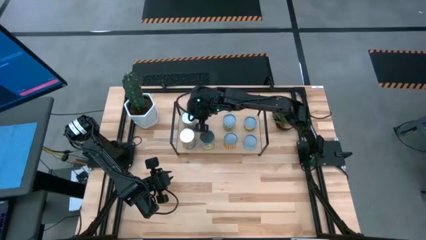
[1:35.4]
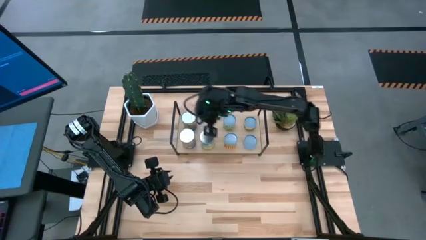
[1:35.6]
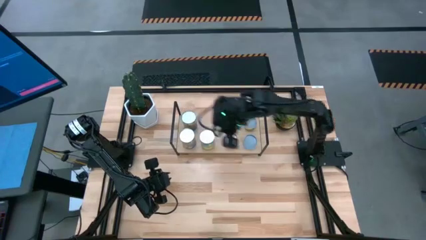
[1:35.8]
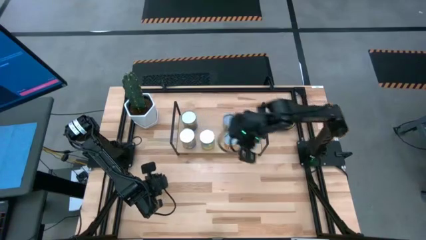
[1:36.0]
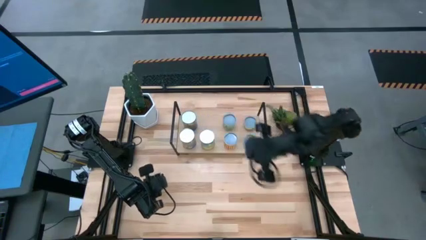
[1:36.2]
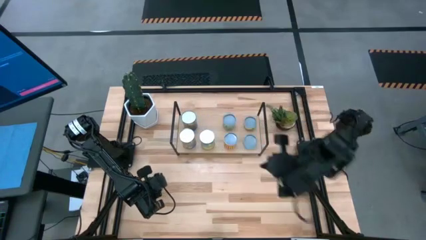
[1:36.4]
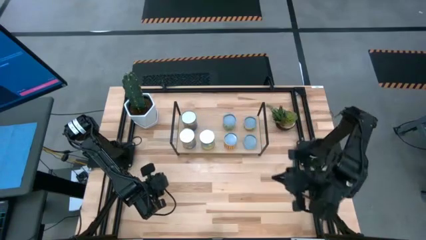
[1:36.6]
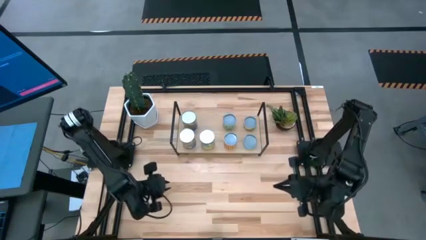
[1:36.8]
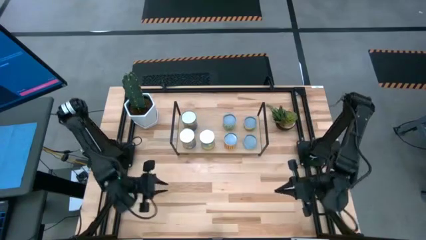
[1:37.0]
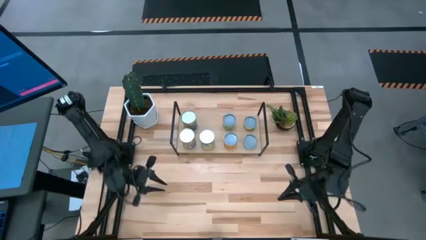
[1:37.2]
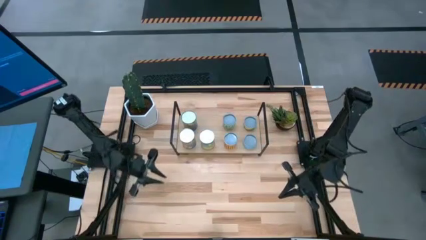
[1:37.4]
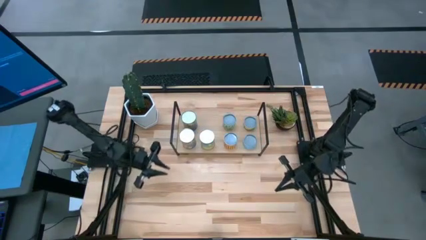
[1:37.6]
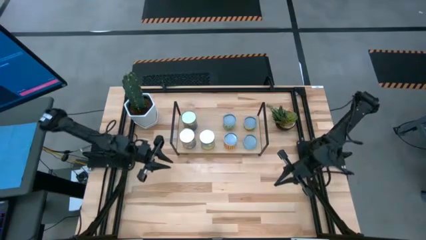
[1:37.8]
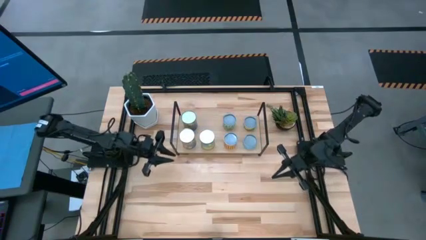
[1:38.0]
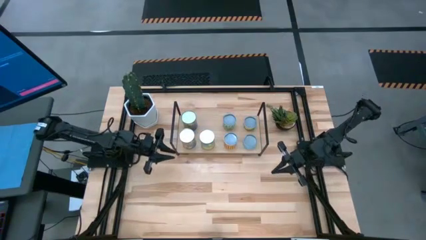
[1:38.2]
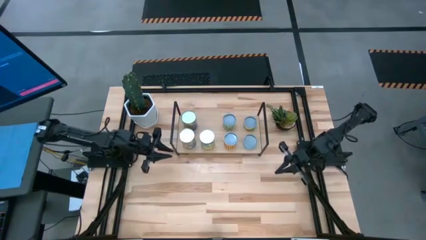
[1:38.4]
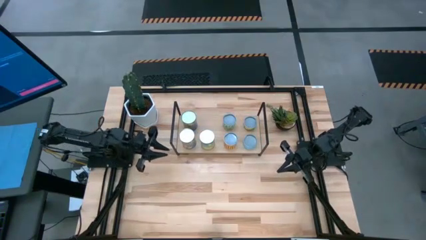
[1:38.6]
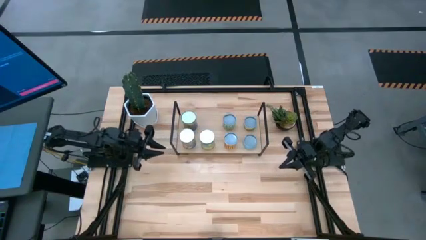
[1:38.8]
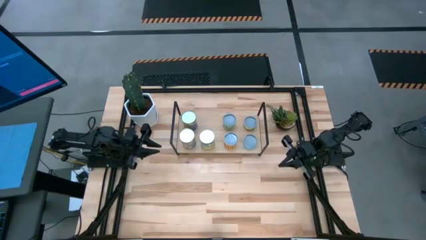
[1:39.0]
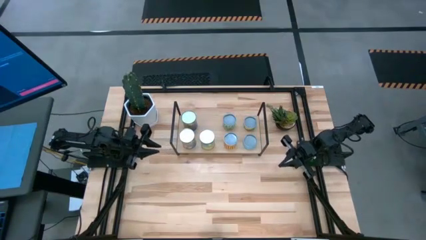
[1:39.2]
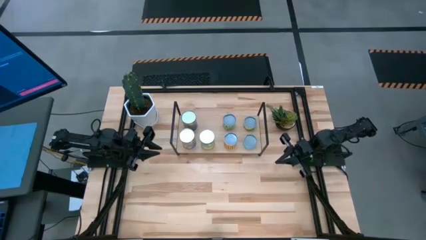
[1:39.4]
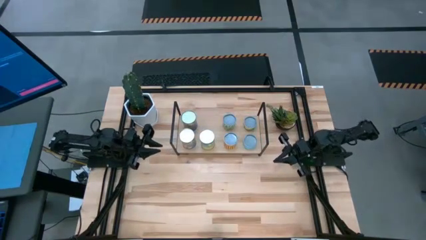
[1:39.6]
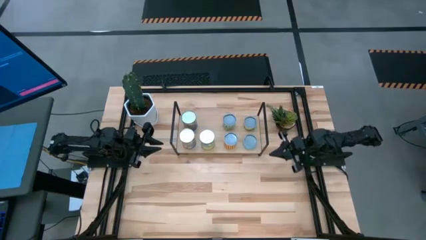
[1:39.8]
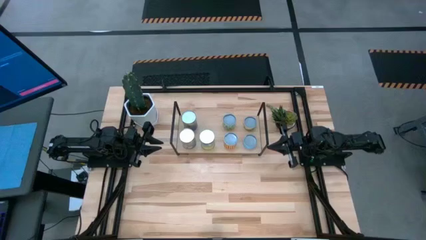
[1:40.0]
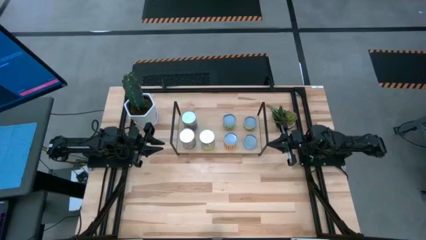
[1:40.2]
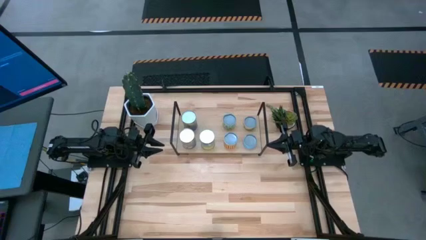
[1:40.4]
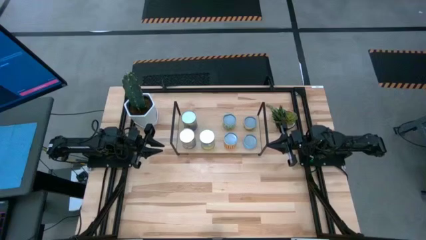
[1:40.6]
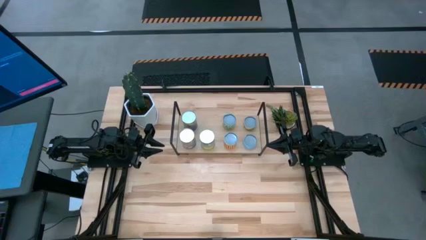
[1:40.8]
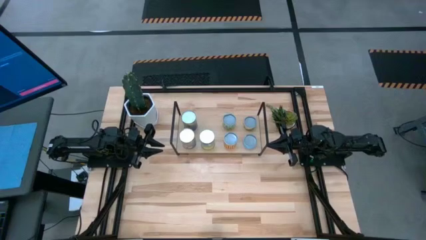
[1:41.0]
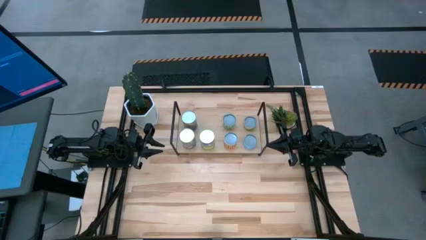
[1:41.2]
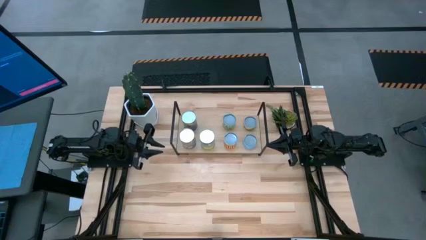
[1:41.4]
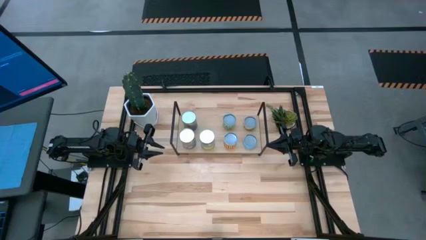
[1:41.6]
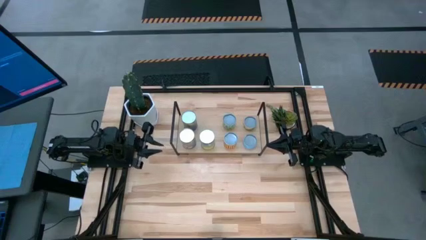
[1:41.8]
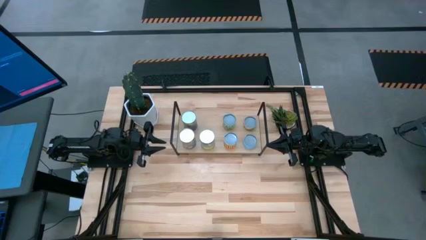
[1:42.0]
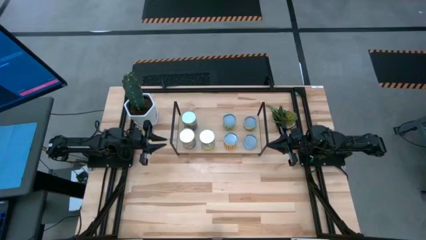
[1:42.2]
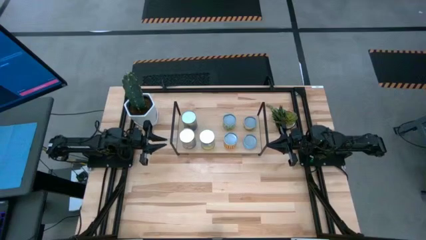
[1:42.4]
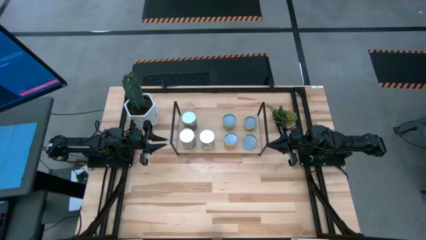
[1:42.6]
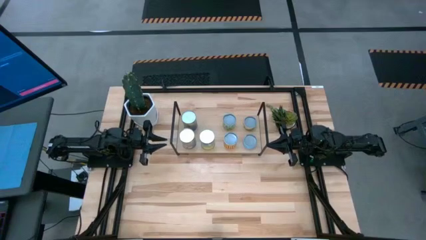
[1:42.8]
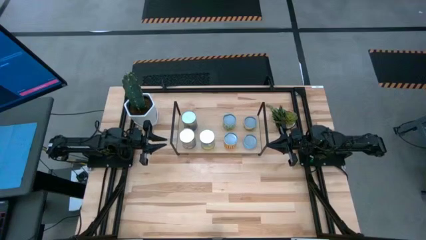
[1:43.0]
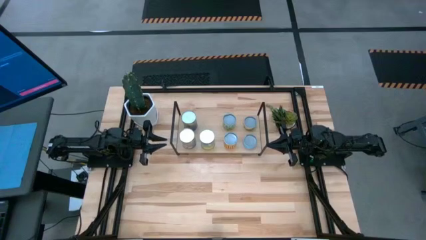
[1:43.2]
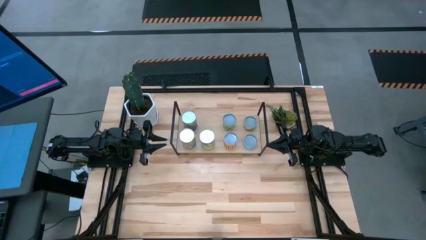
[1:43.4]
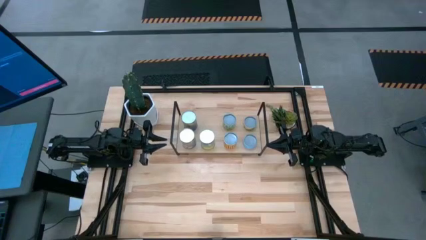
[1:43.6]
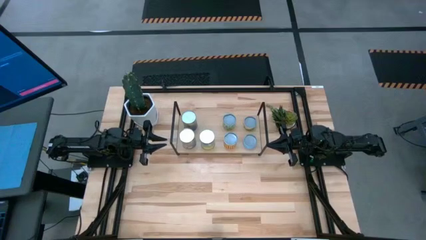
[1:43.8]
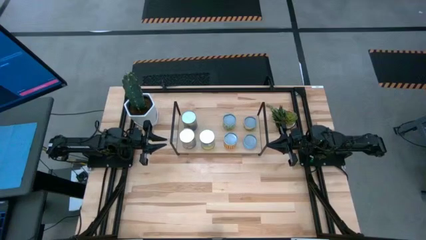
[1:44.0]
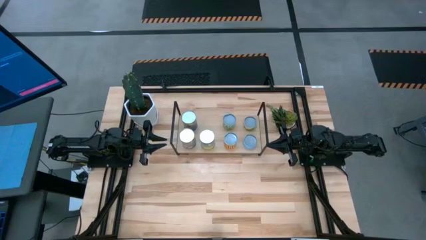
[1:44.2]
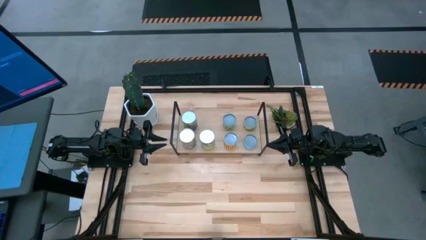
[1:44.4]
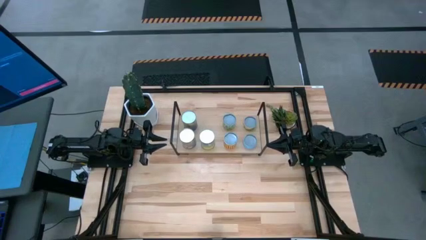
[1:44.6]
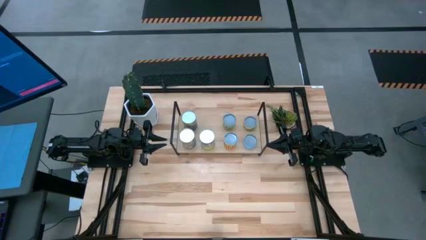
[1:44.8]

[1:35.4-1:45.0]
Task: Pick and place cans onto a shelf
Return to Home Position

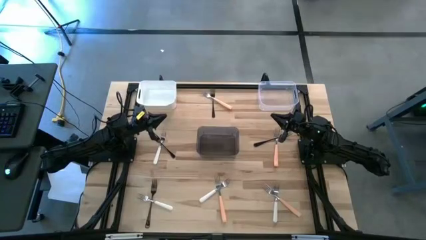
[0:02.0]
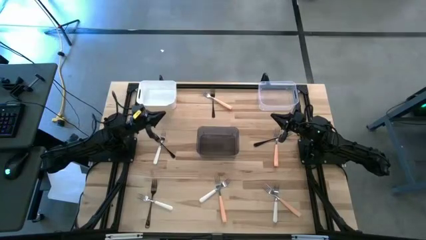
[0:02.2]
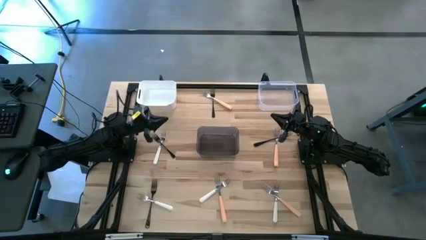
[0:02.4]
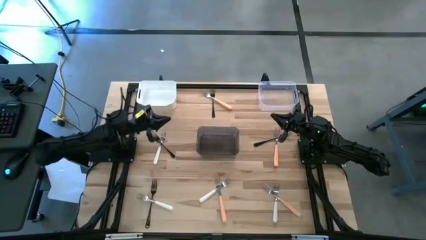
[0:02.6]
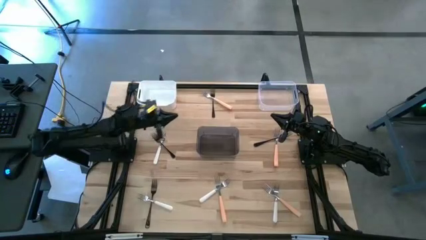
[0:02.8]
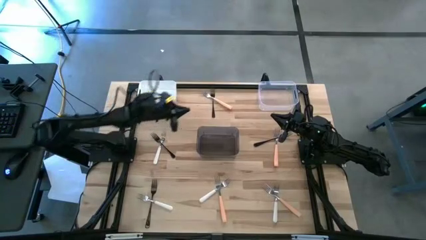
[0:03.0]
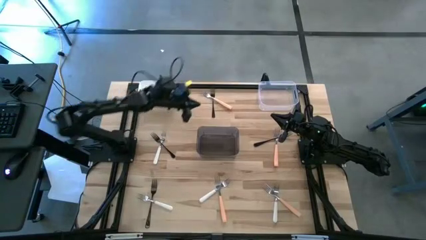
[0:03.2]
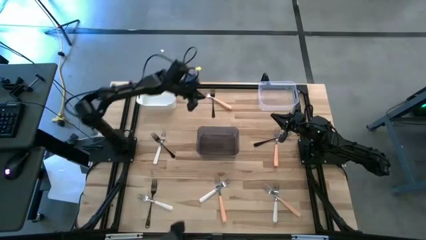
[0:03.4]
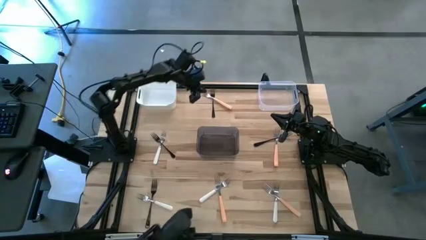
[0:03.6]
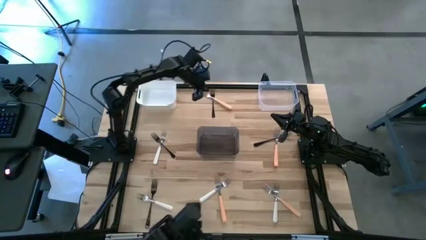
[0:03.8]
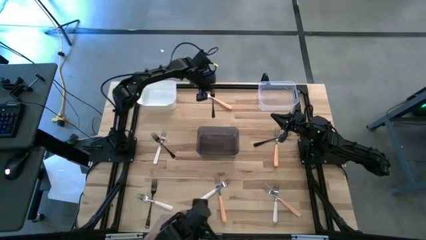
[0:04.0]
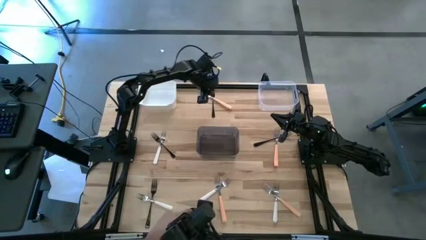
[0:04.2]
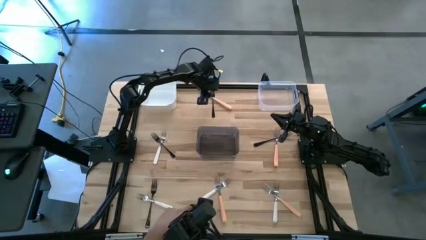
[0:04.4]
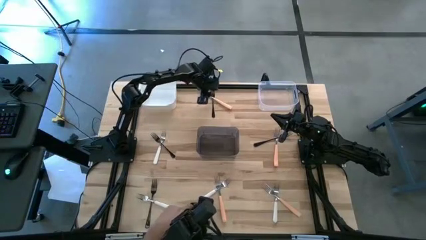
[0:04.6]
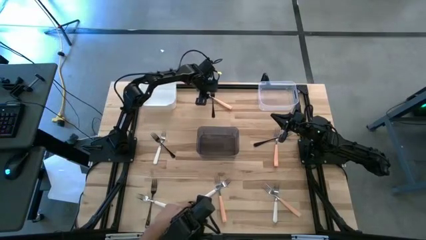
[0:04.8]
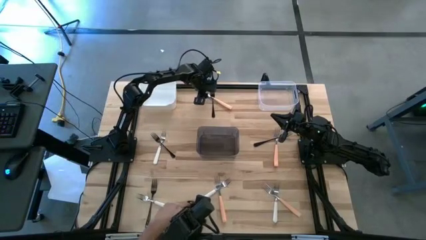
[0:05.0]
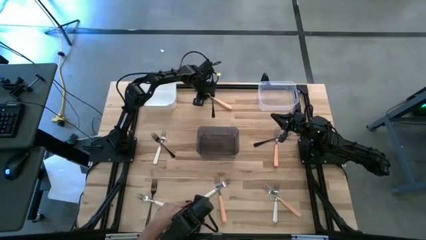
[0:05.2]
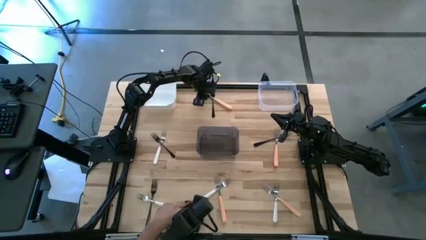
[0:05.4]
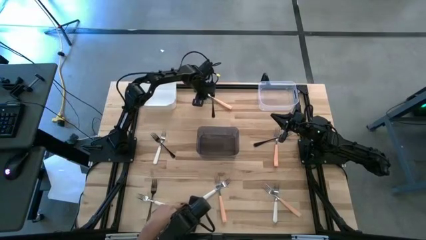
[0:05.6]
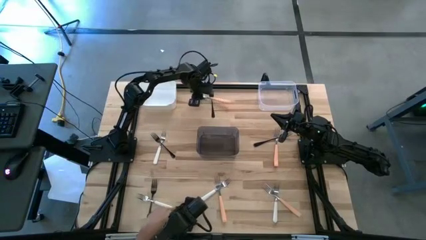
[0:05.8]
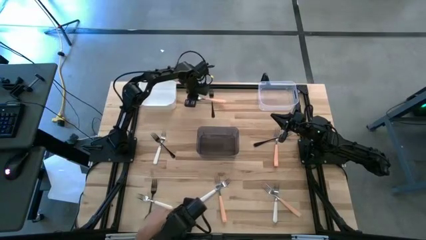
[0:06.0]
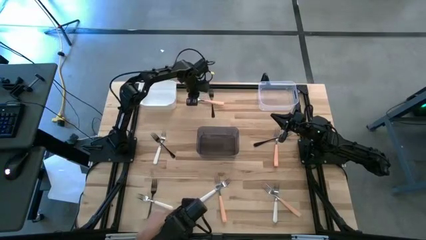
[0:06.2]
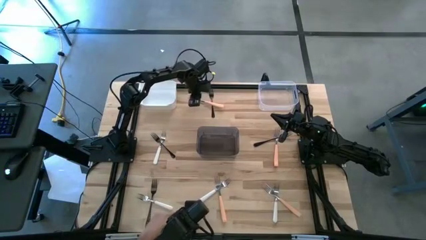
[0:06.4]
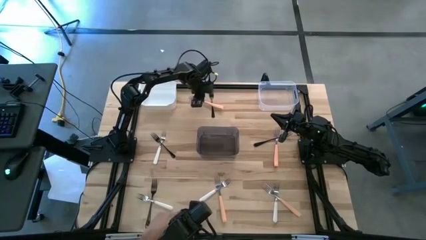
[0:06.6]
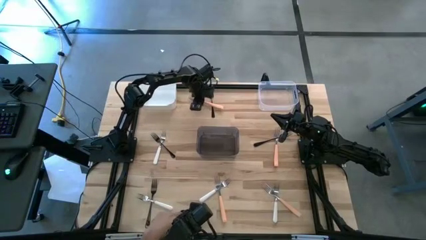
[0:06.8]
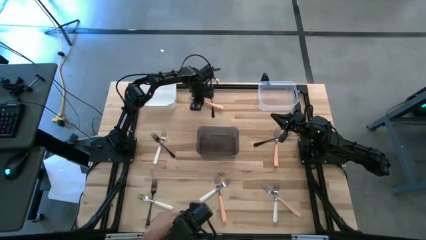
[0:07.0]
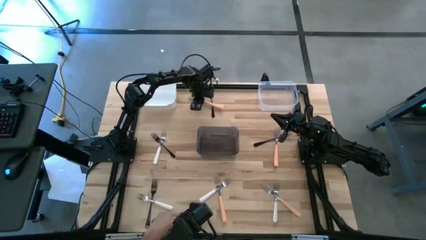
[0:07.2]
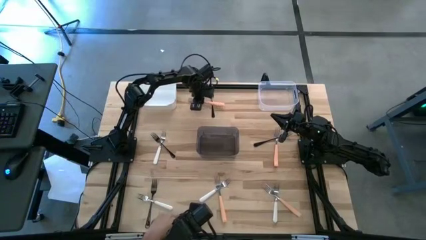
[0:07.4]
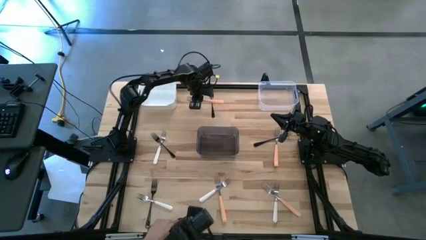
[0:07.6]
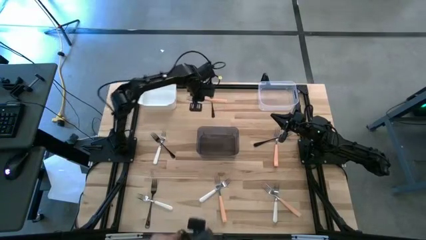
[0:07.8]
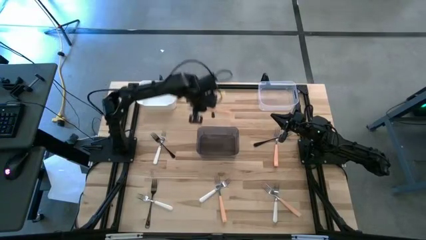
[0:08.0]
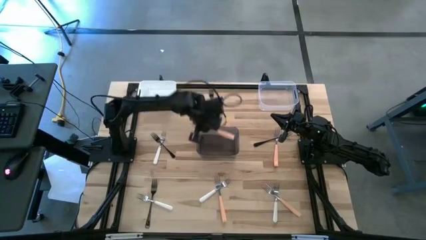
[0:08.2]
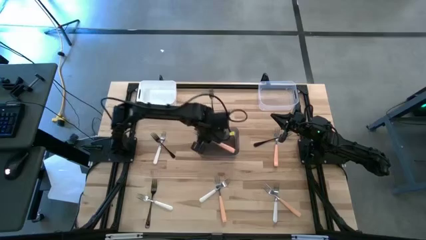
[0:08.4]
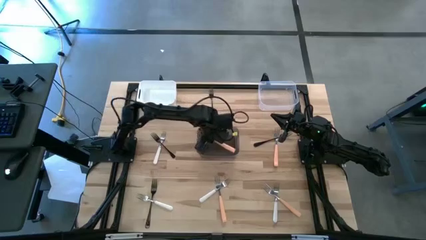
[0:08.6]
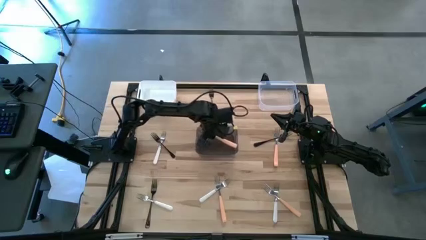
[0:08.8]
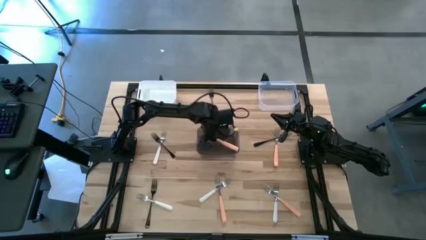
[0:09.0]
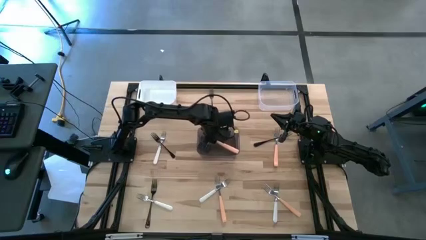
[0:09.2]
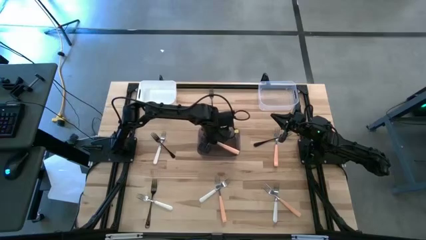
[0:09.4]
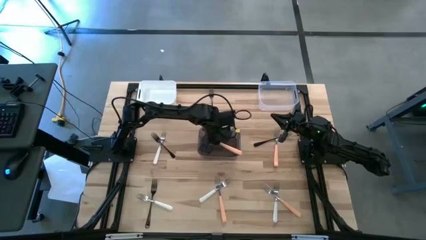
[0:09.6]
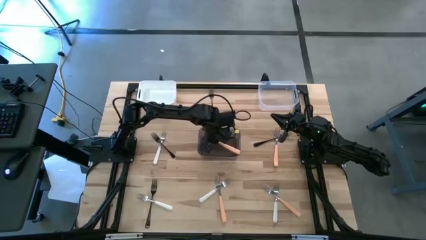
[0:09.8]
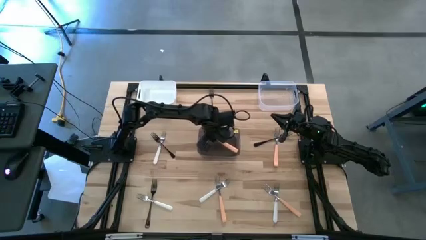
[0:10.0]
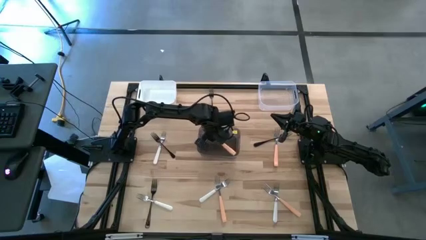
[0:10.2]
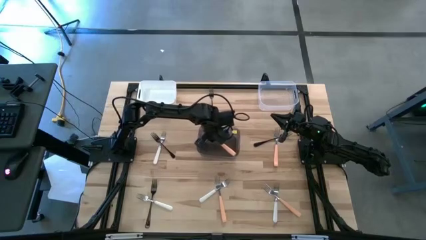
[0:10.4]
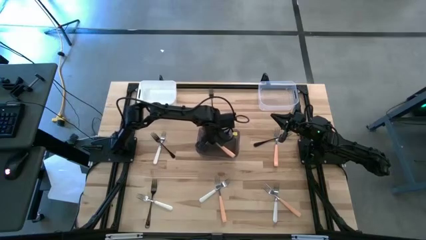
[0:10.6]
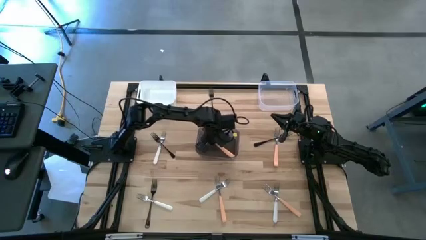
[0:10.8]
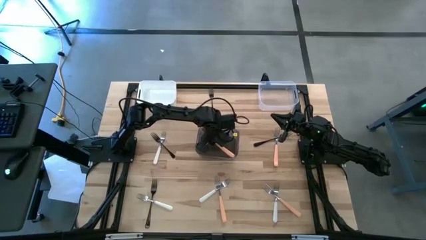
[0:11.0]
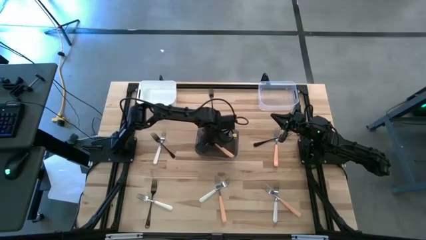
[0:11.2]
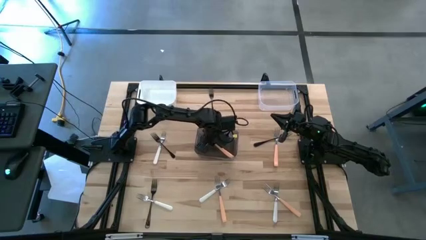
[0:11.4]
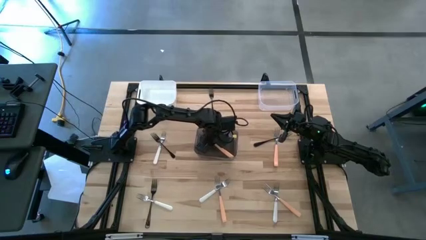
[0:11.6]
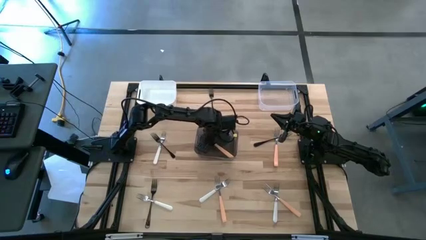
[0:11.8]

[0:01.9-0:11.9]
Task: Sort silverware by color (type)
Put the top right orange fork into the black bin
